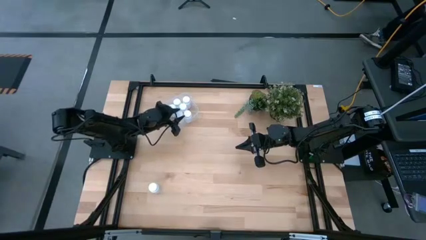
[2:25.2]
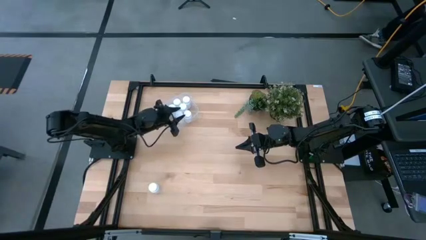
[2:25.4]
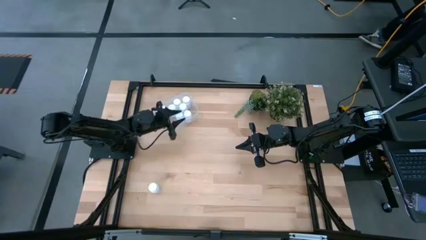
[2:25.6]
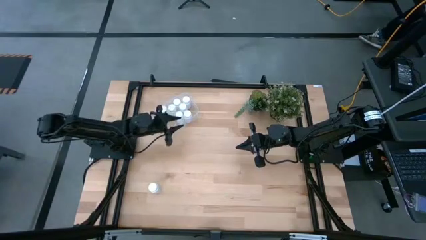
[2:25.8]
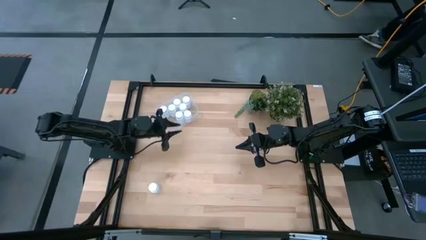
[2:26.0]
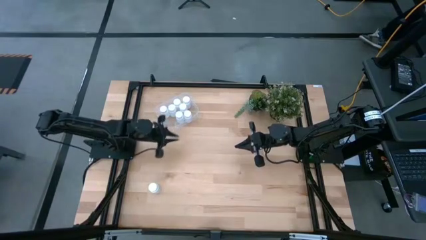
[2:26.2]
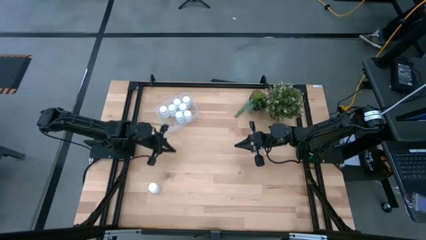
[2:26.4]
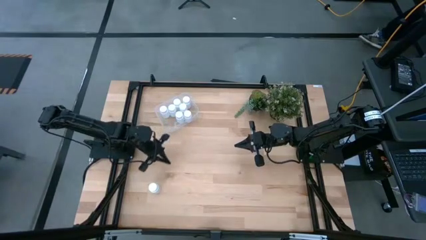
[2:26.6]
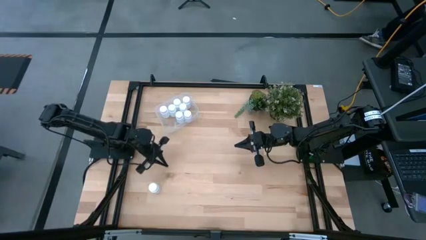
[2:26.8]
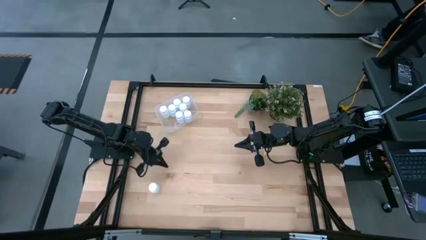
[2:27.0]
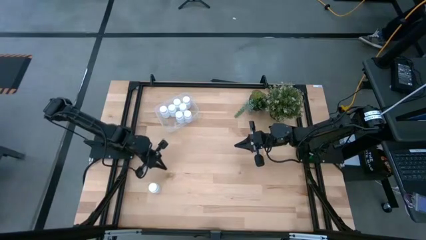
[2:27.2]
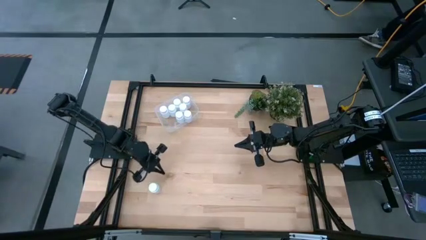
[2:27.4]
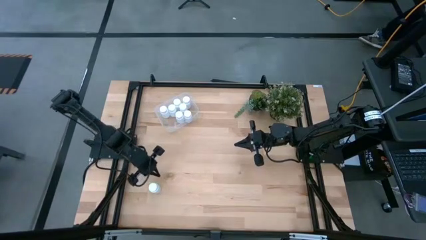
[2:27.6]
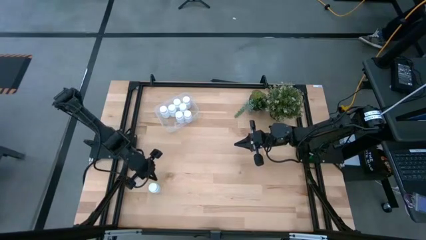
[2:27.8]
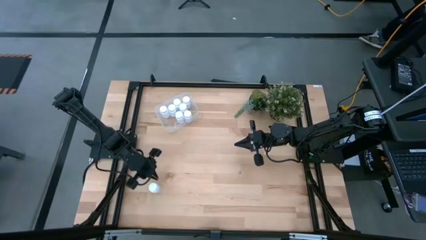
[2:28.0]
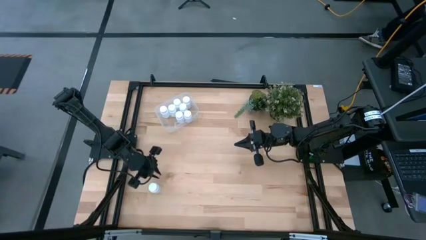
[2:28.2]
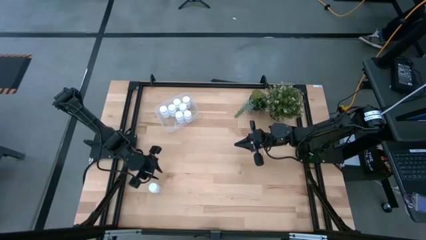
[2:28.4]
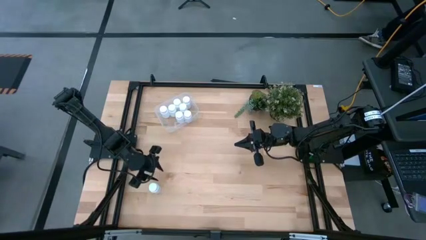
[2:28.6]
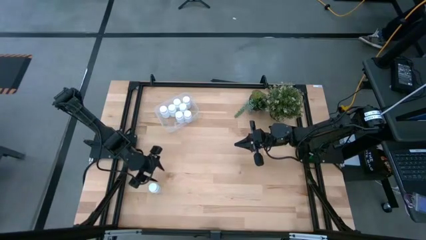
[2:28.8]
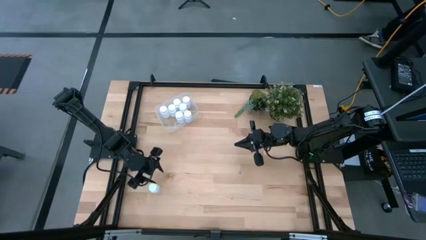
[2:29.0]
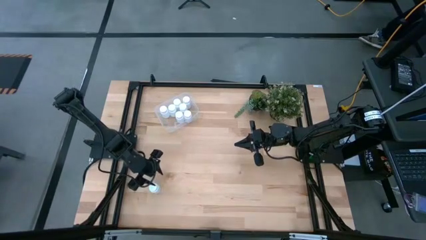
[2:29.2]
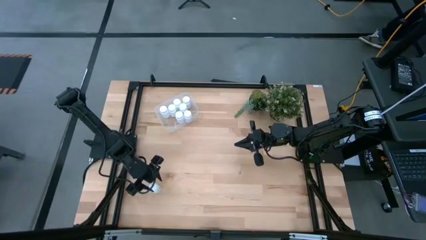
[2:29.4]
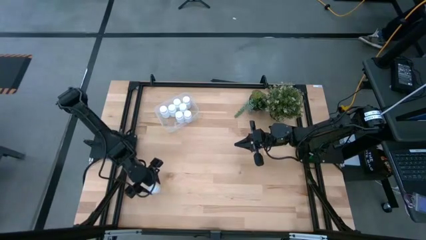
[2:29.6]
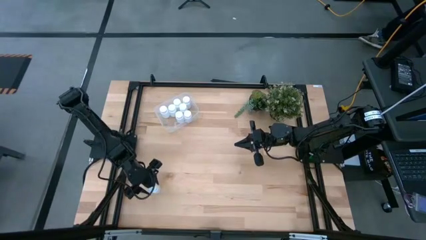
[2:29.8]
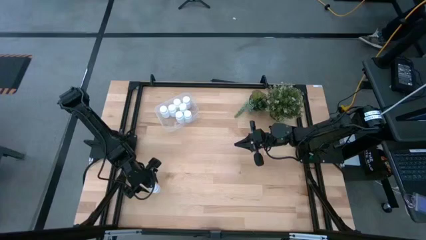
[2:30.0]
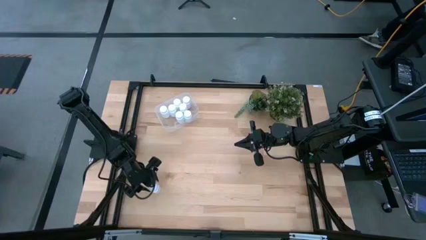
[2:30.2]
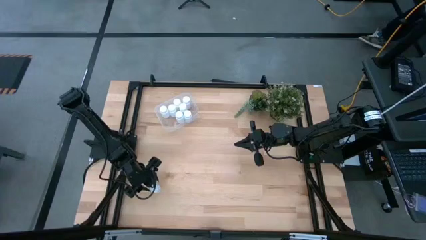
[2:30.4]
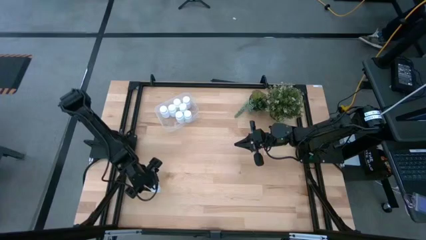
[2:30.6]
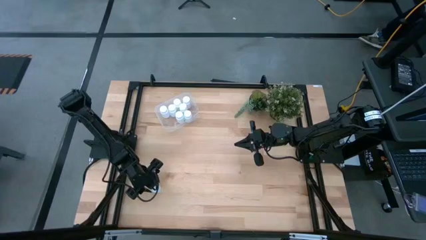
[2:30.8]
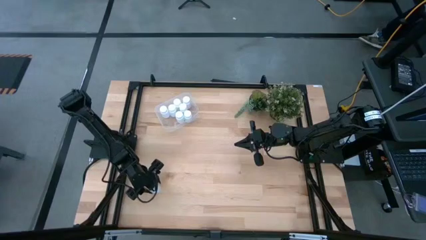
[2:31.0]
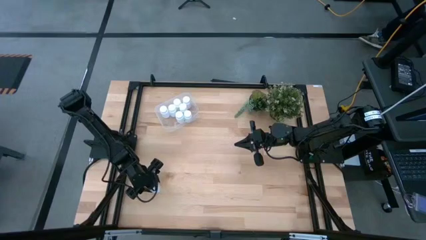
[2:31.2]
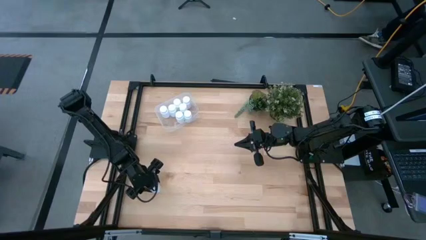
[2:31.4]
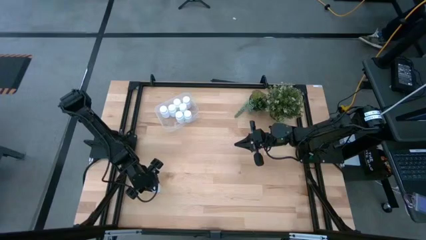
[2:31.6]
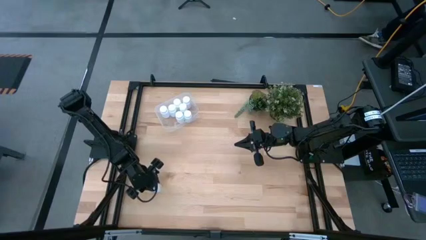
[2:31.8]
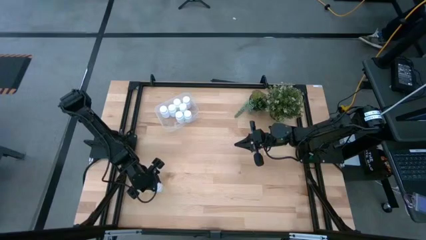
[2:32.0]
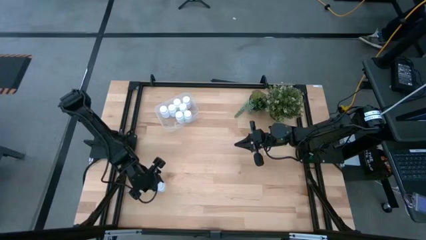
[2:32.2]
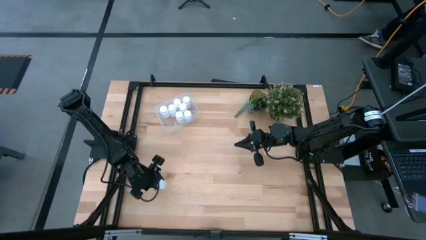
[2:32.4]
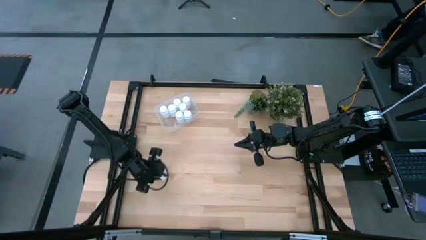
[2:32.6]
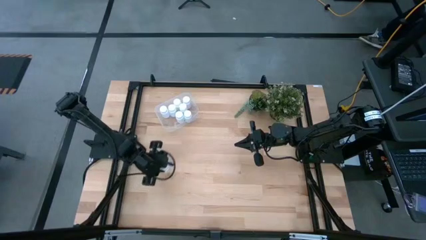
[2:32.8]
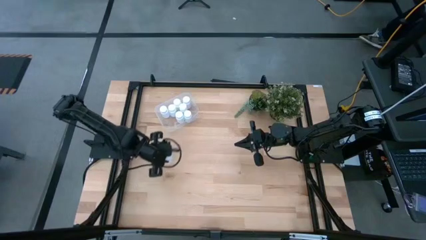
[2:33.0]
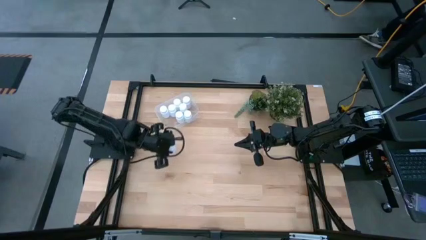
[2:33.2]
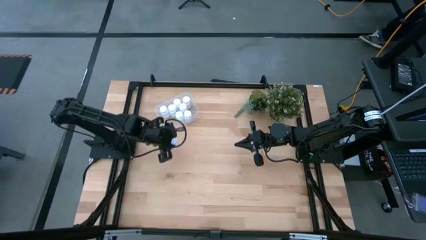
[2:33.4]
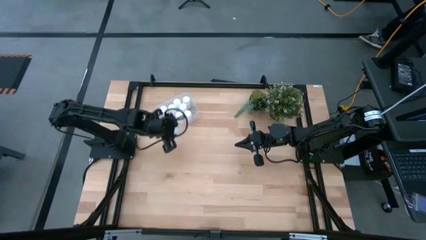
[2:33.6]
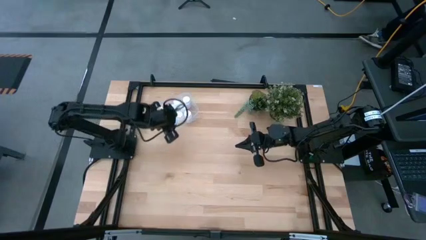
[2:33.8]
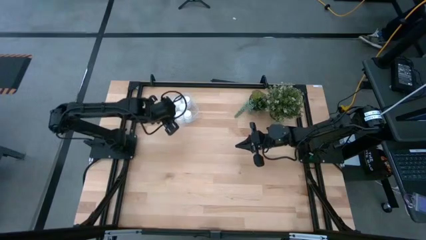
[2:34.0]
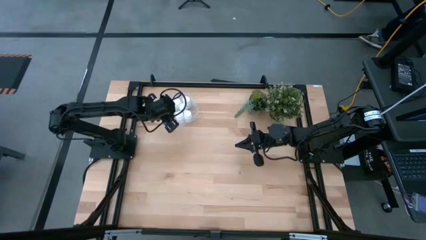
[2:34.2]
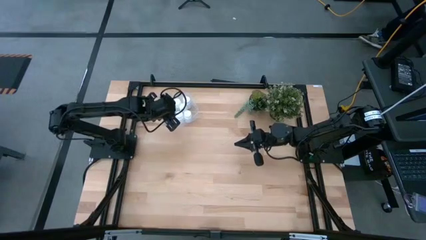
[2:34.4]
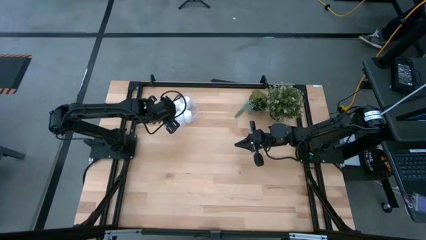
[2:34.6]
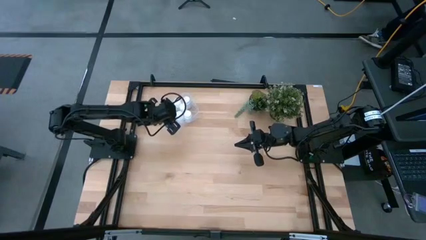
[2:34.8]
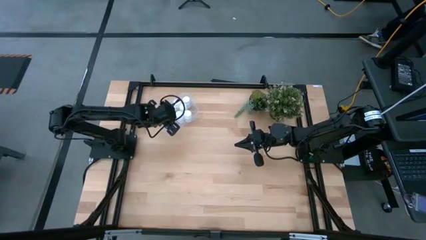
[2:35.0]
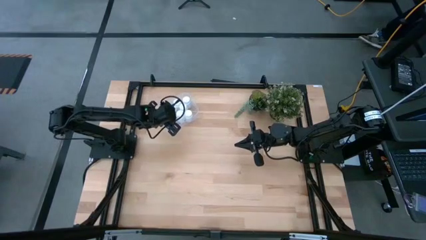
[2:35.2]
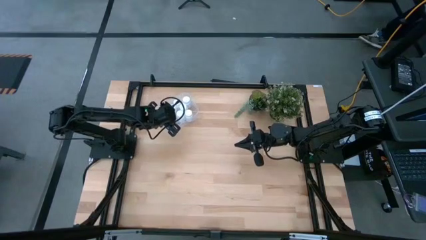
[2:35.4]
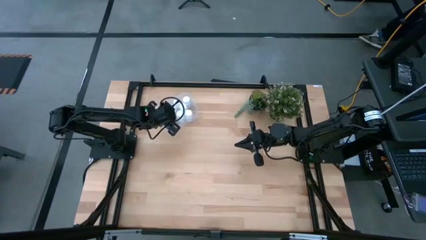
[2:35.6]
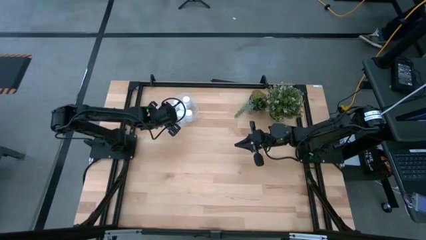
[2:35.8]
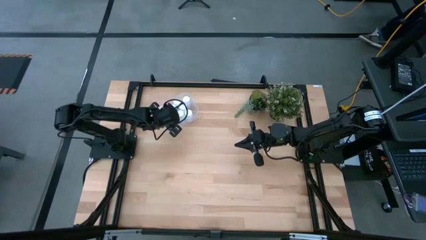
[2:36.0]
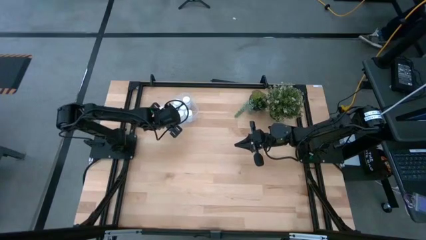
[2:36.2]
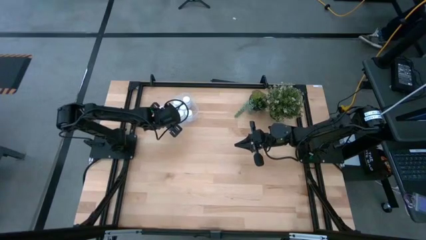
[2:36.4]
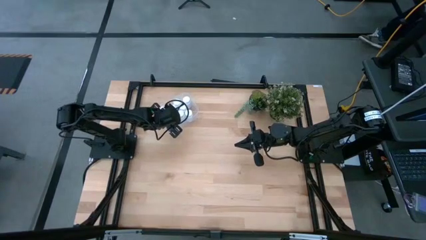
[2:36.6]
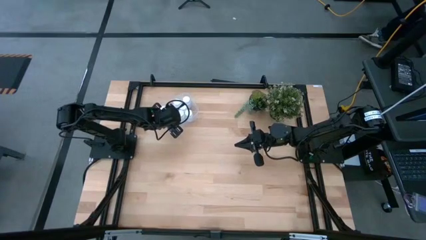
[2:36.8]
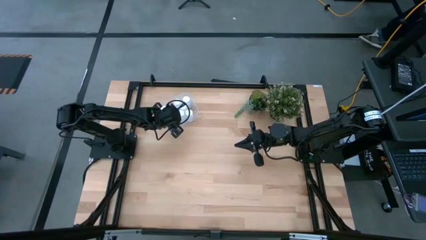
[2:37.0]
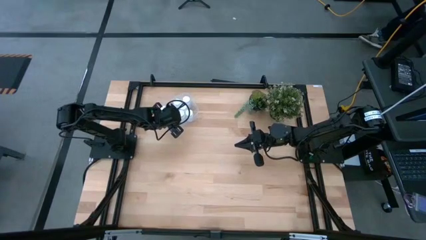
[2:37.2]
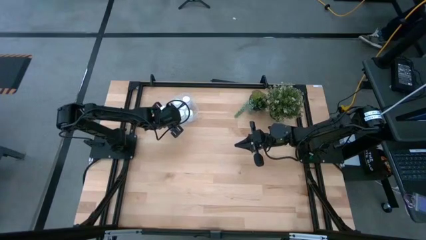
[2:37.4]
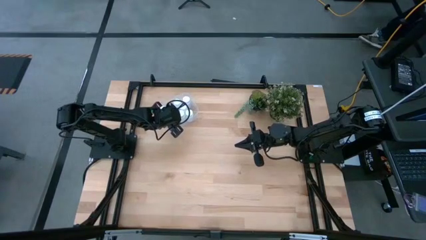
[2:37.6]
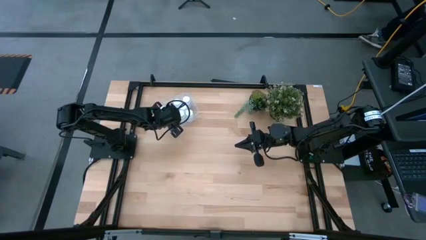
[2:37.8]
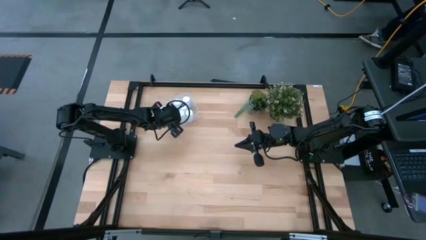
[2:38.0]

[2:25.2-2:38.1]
Task: Pick and place pill bottles into a basket
Put the white medicine bottle into the transparent bin
